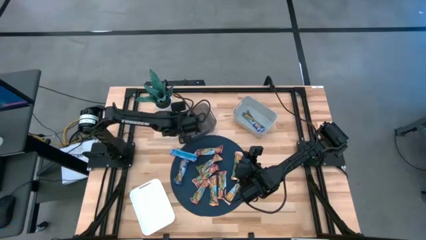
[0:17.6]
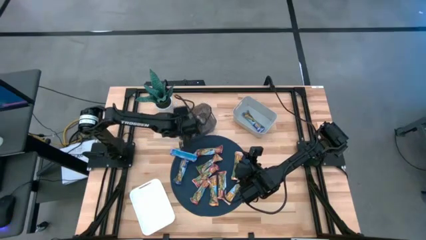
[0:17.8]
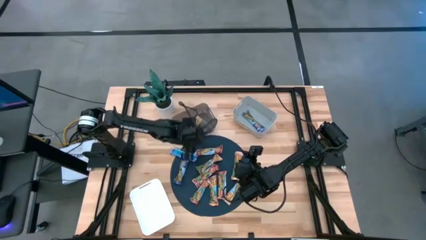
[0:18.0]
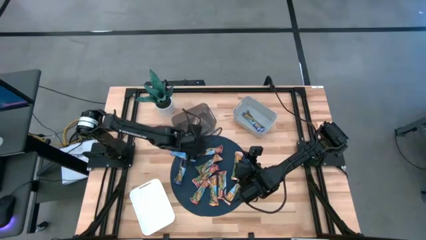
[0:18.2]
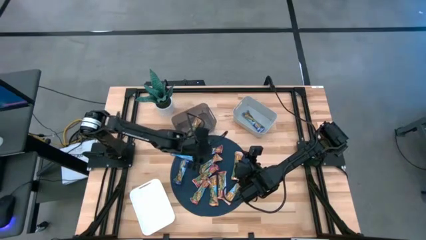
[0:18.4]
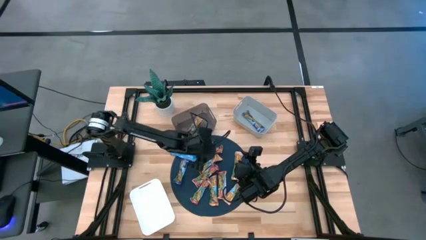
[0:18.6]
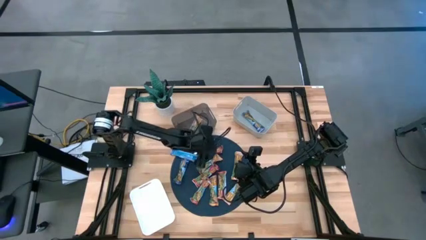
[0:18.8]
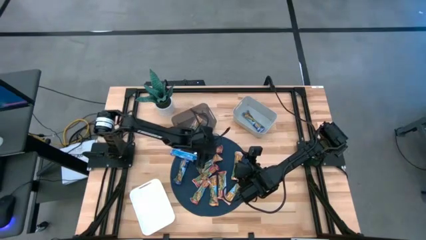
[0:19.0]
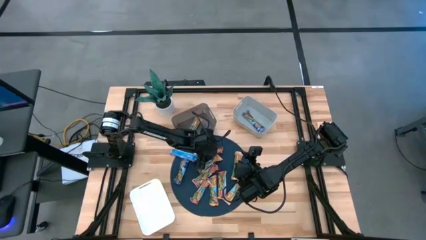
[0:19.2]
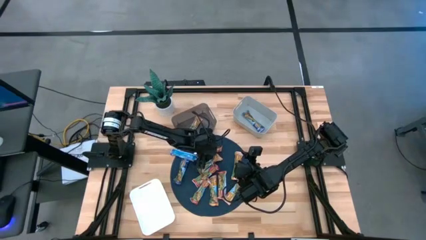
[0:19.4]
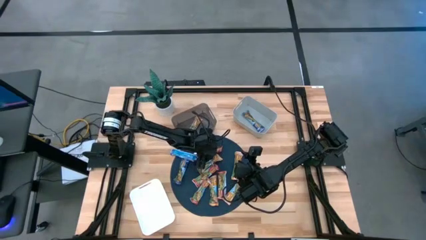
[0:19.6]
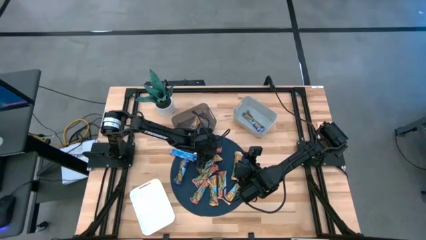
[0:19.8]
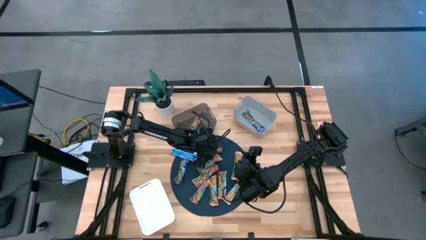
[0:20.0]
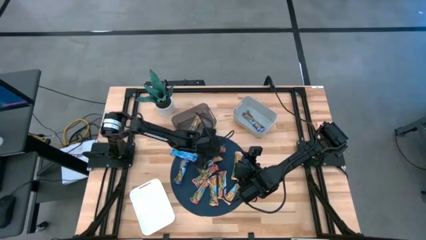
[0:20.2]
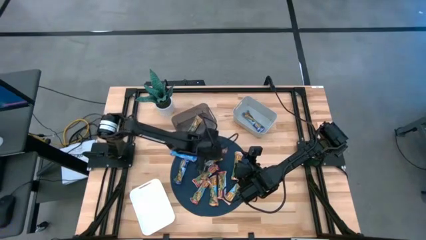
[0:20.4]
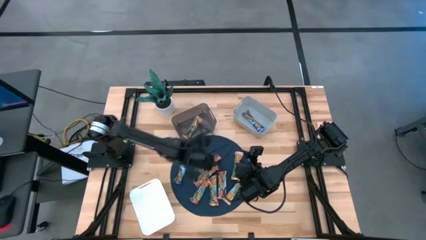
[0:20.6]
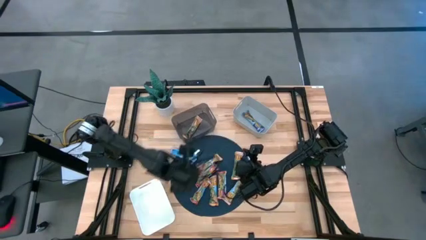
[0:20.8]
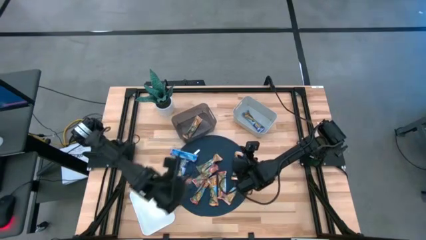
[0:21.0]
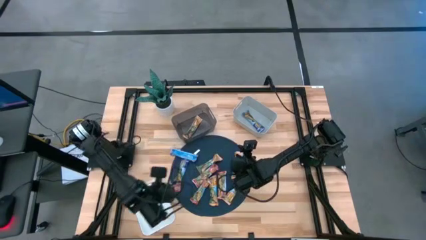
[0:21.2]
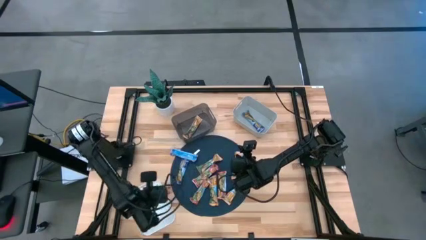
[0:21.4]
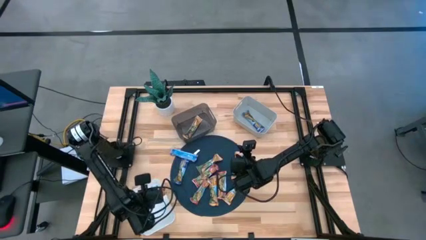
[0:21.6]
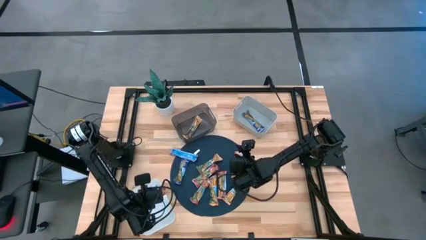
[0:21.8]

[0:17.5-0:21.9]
Task: Pick and place Granola Bars by type
Put the red granola bar into the white bin

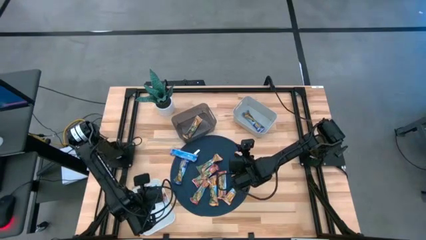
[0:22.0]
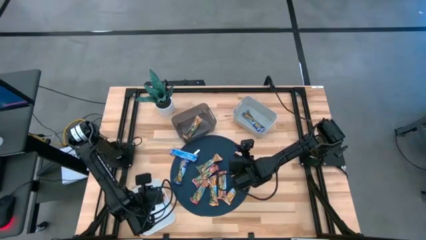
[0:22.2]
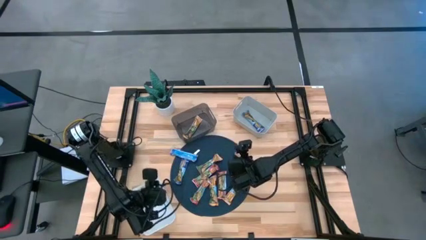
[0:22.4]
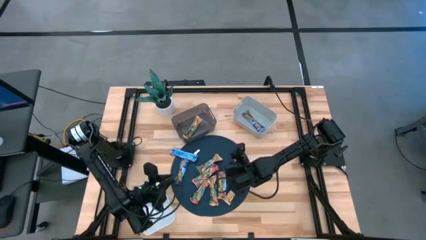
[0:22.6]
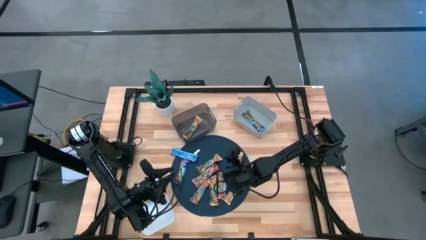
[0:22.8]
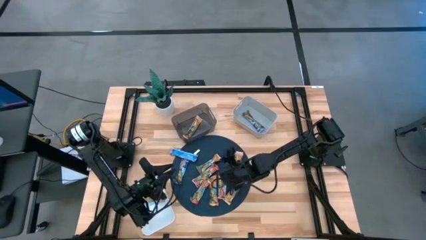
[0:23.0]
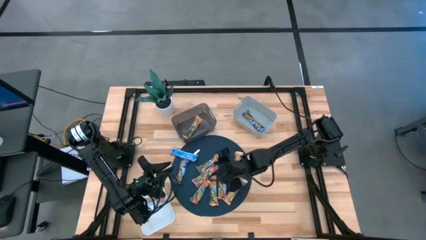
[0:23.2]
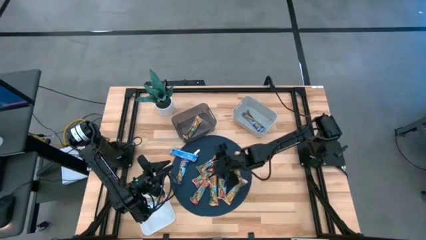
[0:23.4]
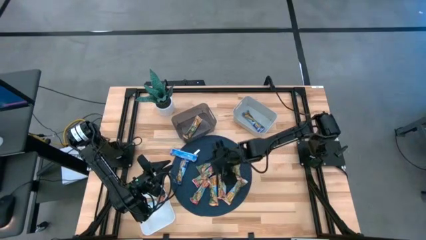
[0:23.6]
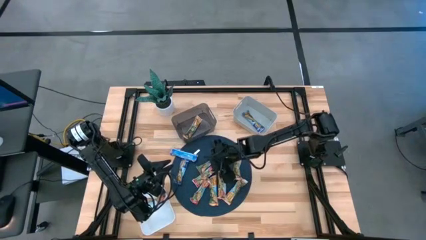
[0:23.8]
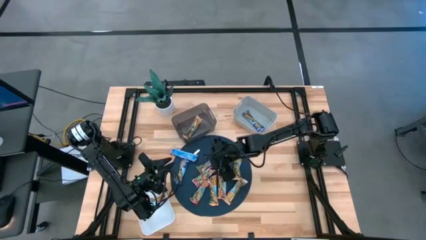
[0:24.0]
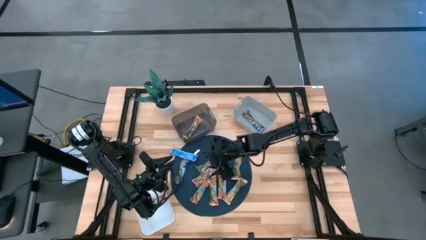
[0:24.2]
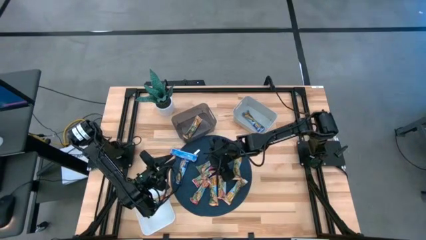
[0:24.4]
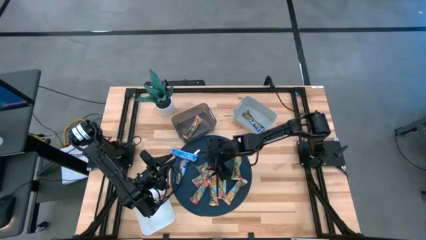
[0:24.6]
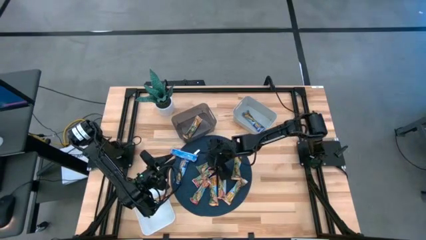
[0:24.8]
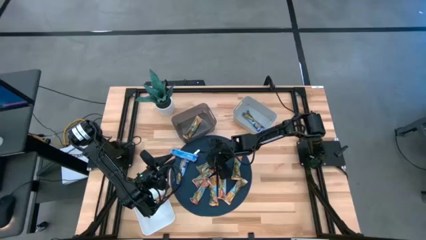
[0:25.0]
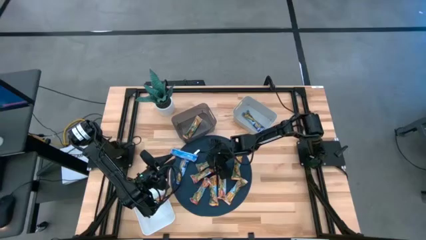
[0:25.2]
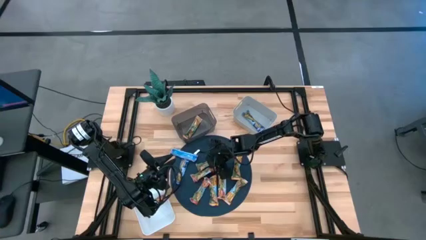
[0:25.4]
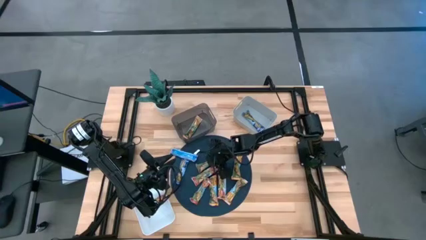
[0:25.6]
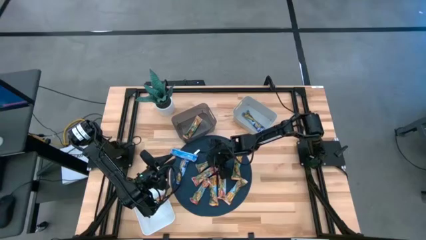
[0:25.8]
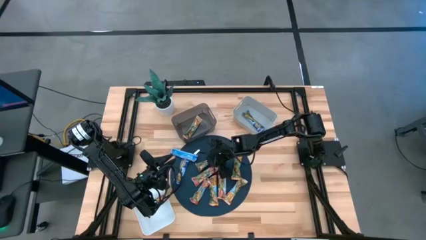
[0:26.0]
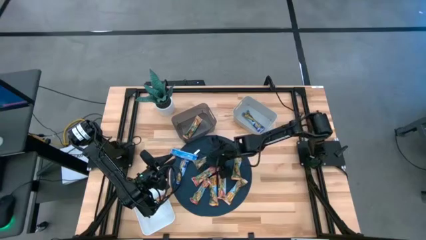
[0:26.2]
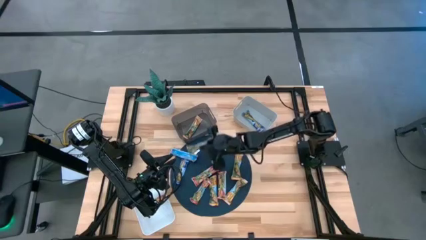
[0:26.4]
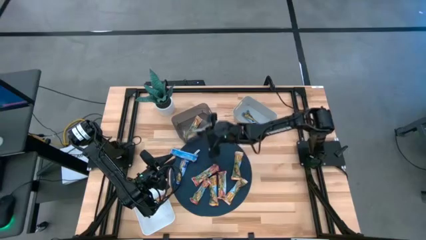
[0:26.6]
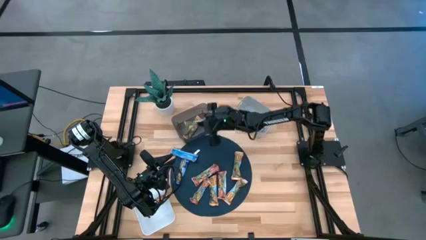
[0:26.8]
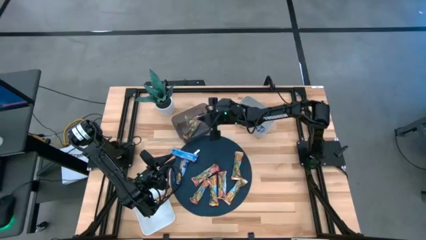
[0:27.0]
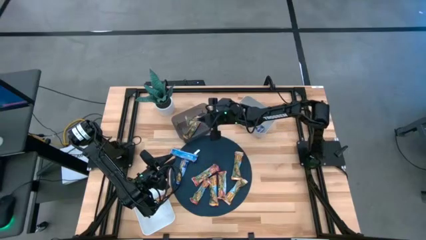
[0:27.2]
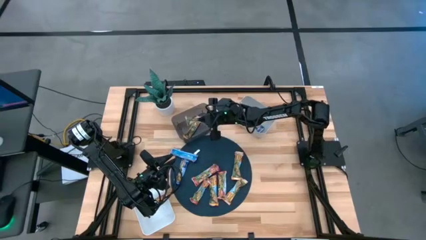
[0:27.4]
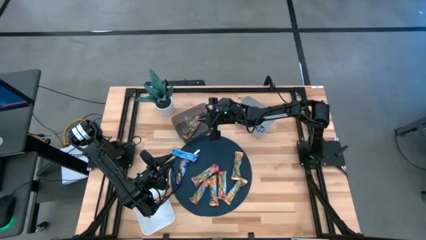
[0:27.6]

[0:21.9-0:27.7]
Put the yellow granola bar into the black bin

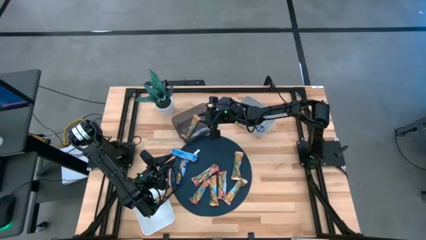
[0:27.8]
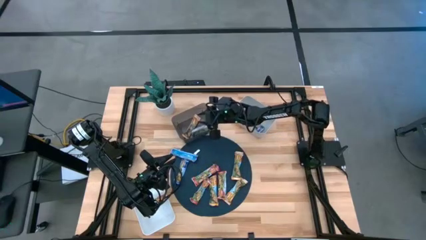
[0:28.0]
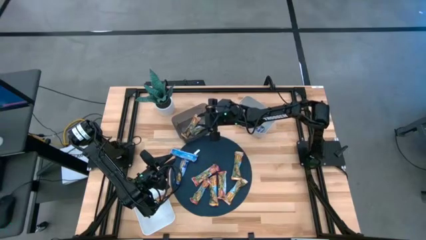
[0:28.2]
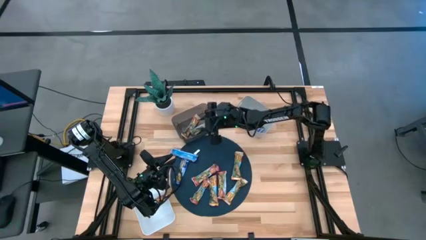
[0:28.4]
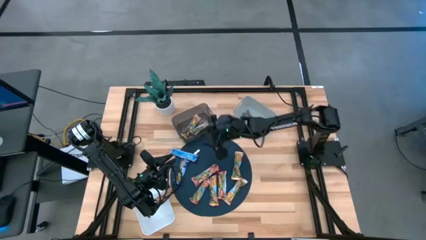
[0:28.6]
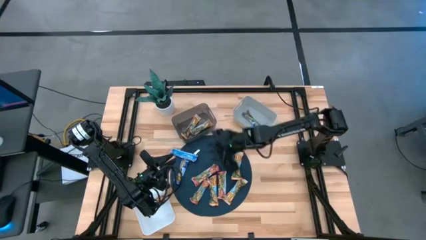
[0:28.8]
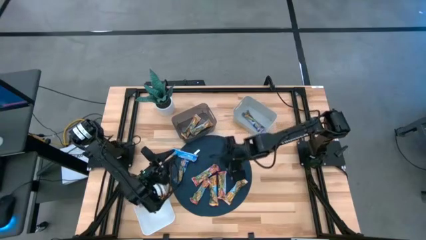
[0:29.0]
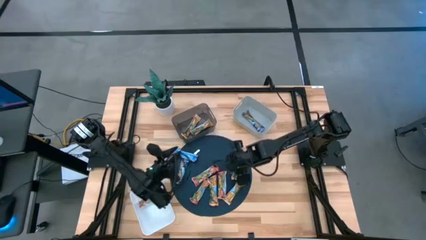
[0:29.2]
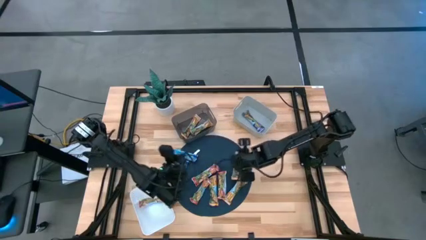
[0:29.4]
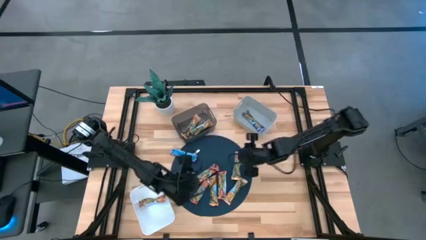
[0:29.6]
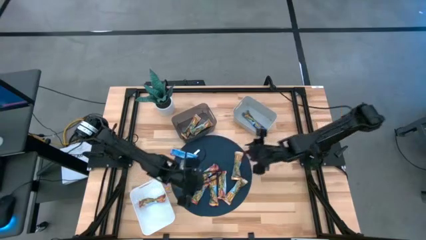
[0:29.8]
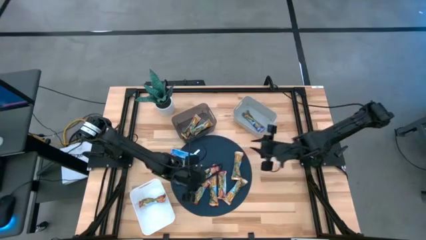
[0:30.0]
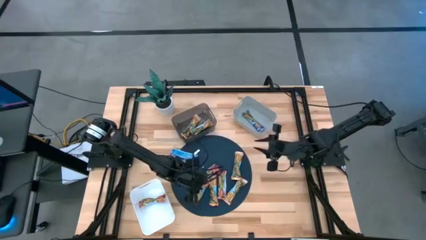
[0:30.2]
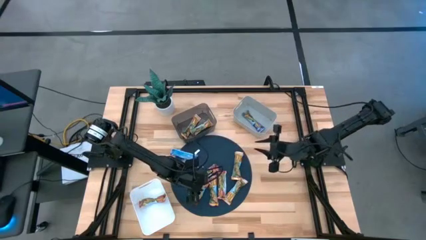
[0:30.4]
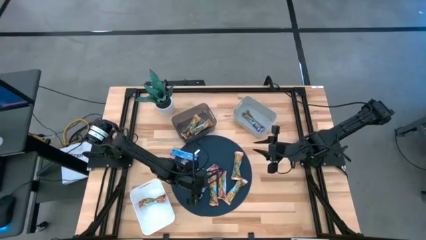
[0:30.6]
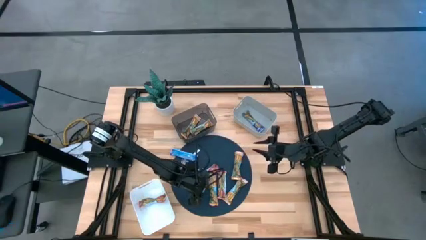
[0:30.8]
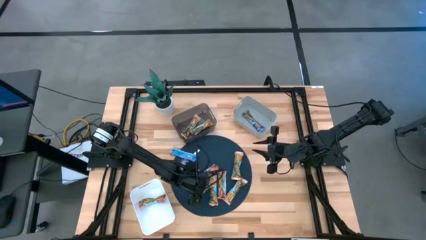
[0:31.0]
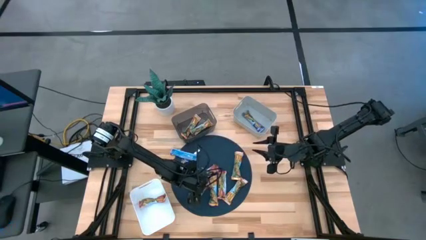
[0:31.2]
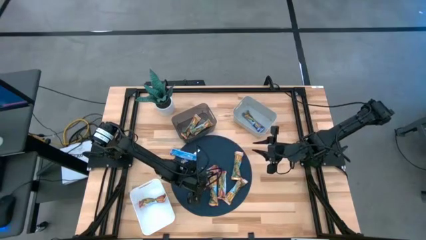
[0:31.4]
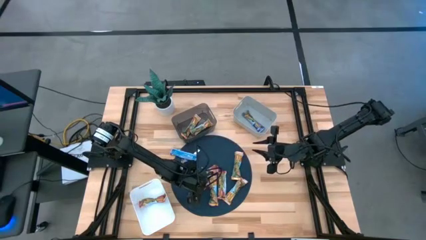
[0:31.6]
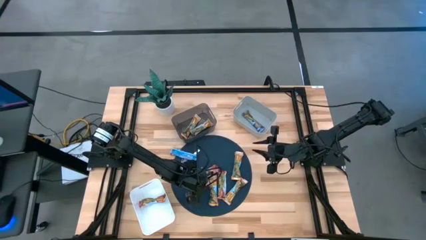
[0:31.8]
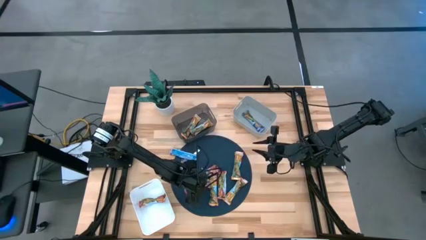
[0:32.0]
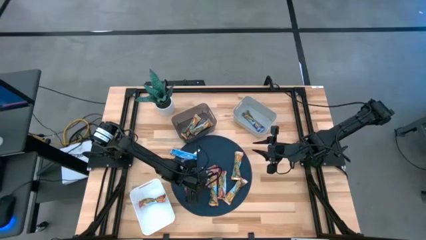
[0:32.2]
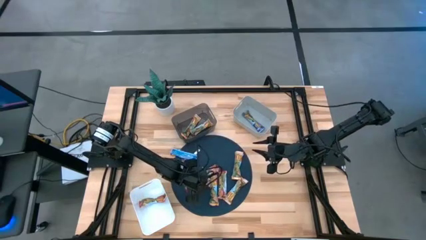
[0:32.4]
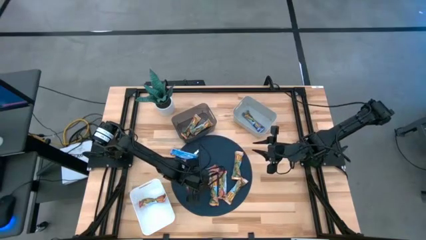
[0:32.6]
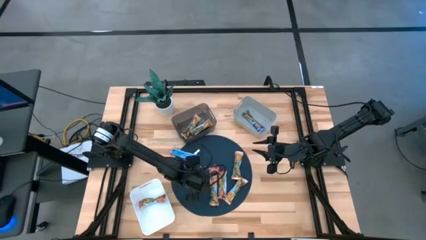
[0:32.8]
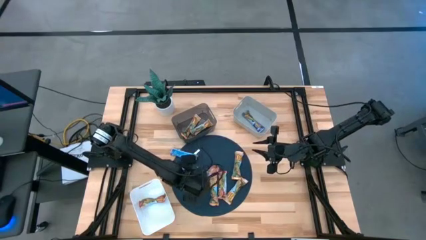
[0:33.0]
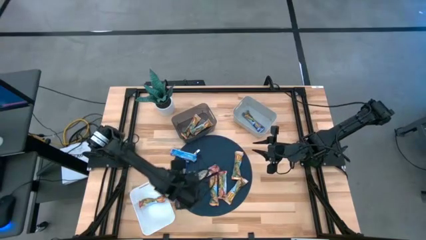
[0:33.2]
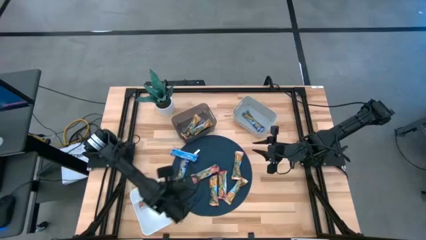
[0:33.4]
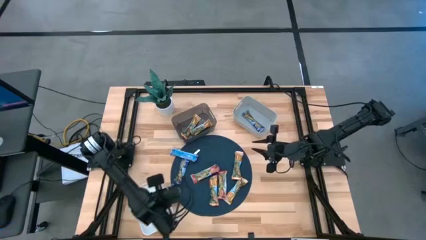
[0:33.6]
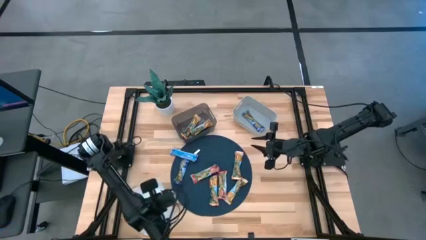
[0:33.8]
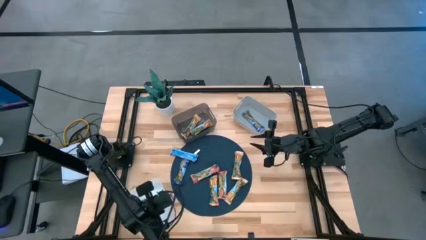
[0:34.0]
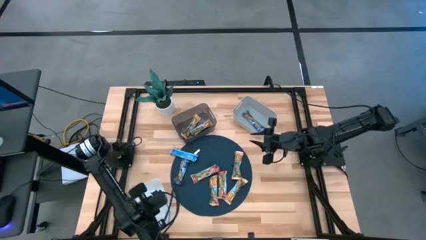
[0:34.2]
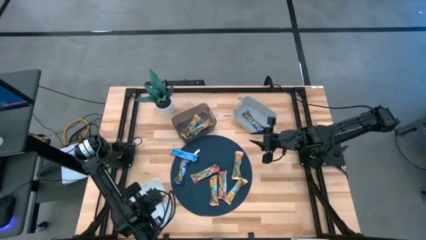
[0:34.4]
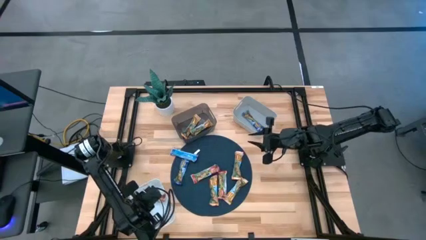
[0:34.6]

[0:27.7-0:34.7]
Put the red granola bar into the white bin
